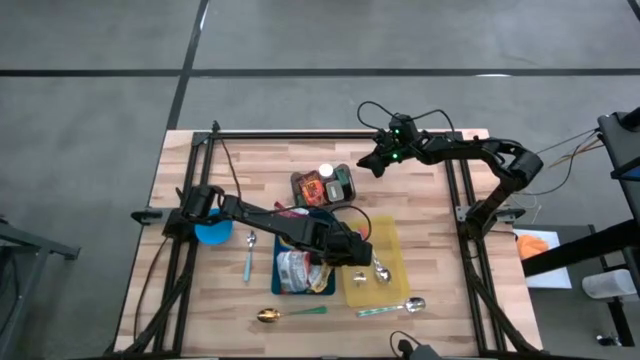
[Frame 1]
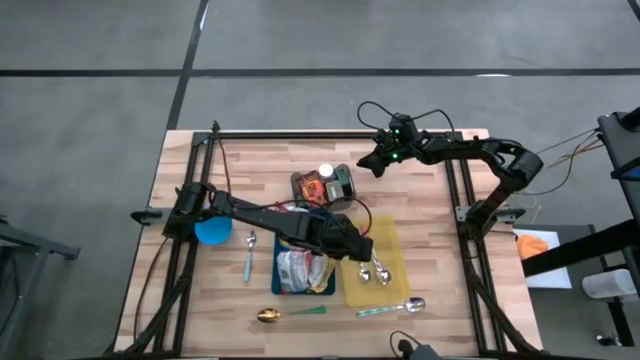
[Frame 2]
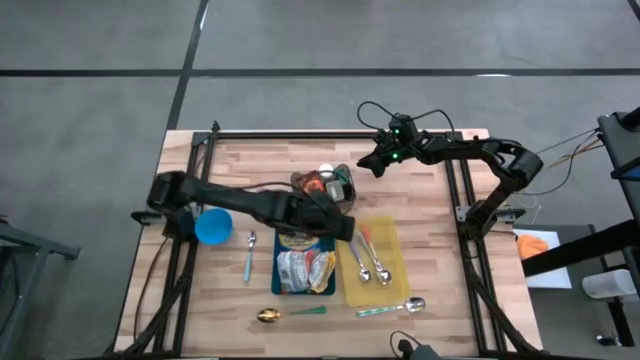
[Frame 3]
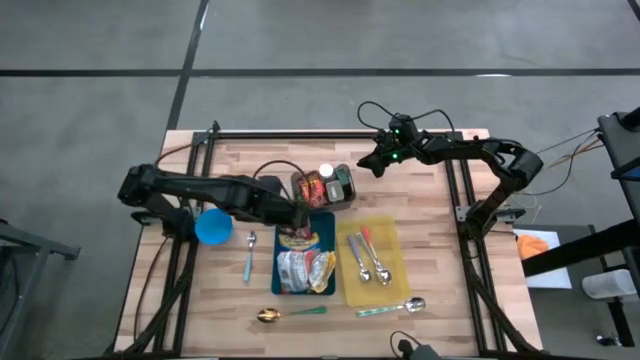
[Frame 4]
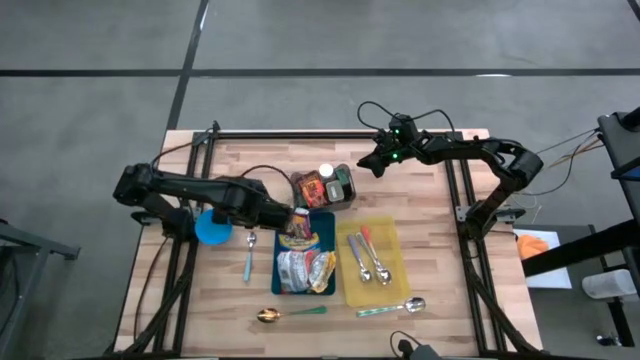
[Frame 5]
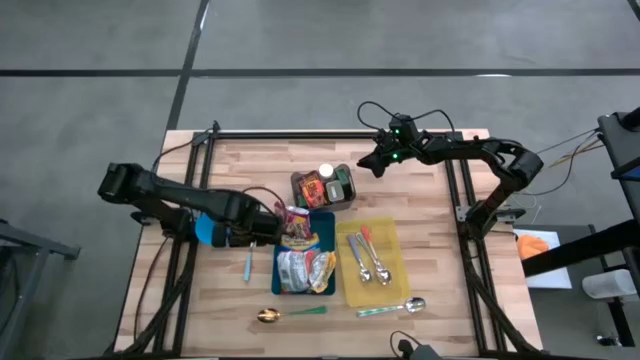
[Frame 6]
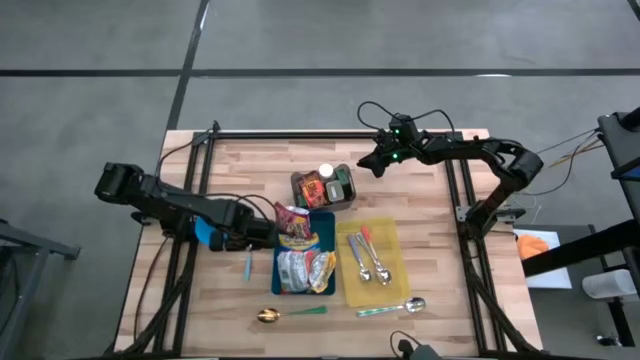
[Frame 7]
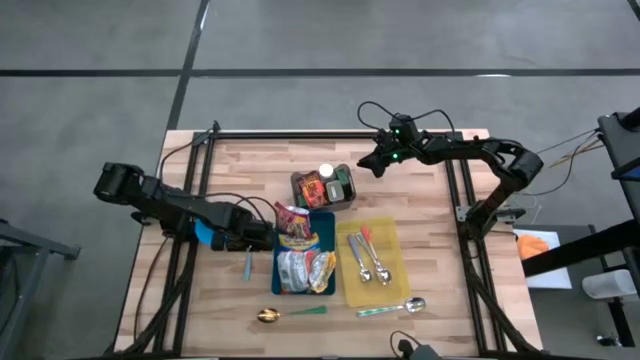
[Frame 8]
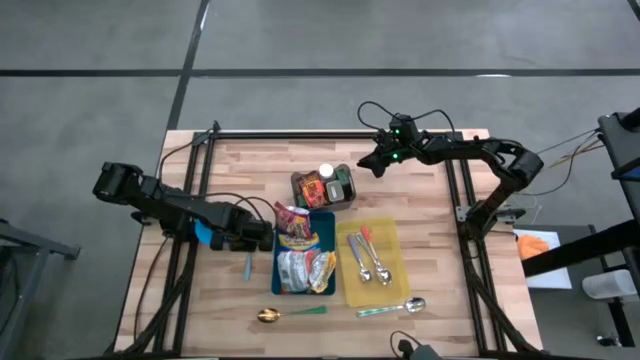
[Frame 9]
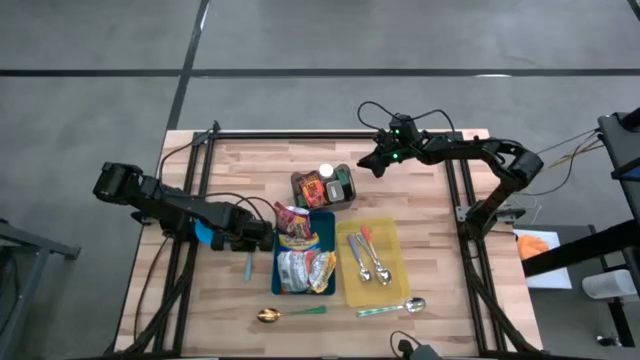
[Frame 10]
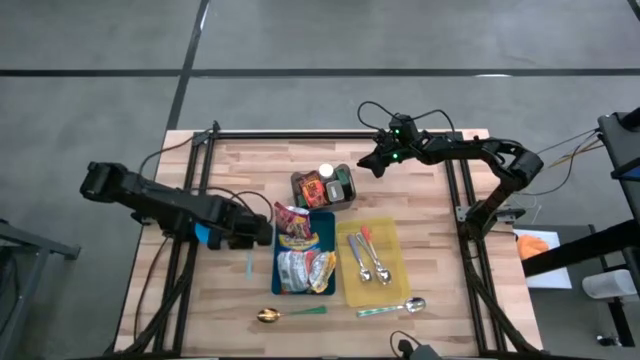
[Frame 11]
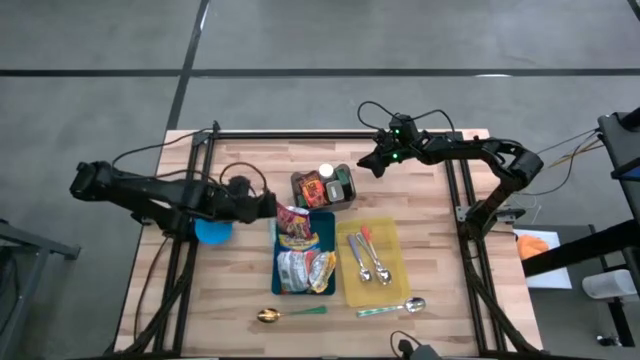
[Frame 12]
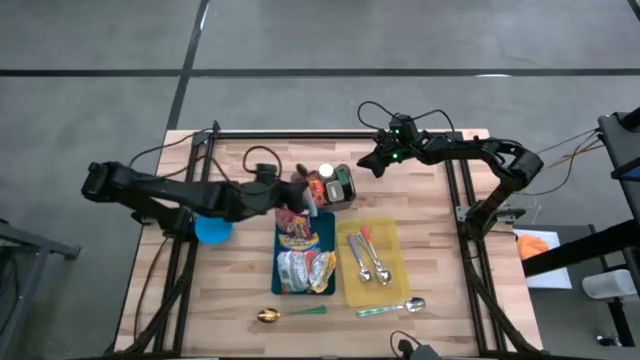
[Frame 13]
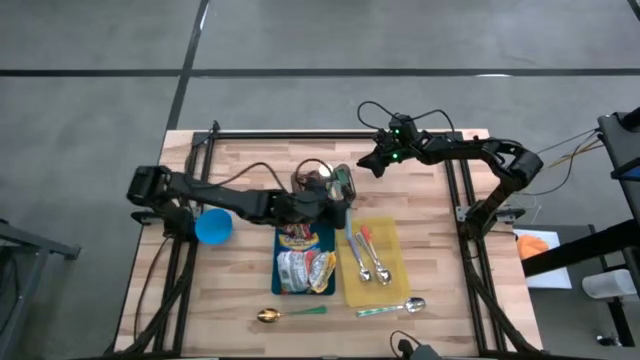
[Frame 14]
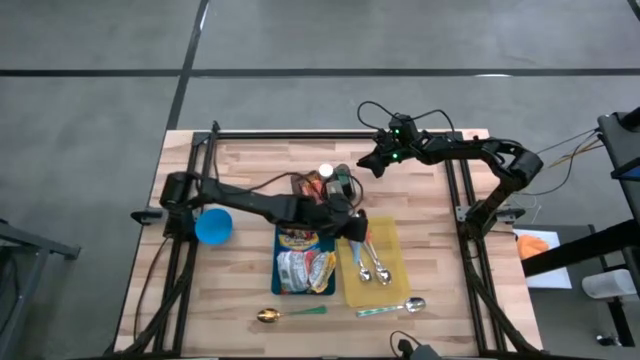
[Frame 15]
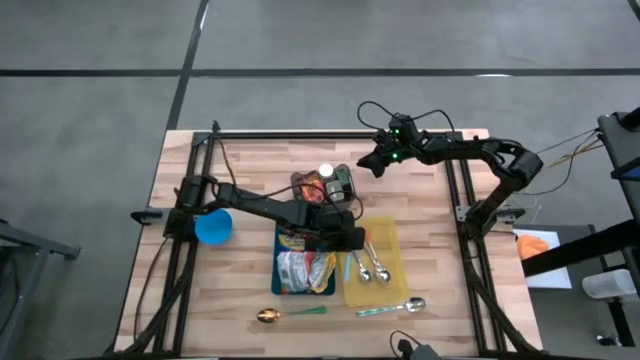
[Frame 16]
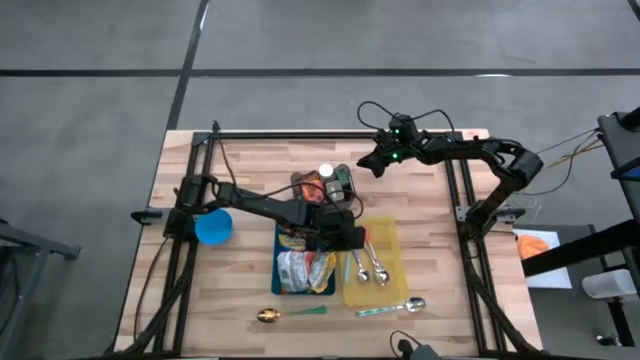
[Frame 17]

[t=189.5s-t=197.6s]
Put the blue spoon into the yellow bin

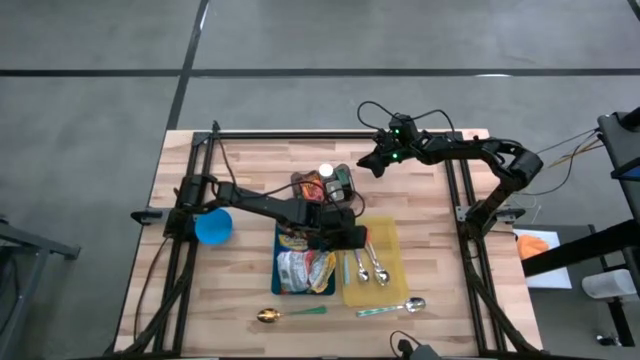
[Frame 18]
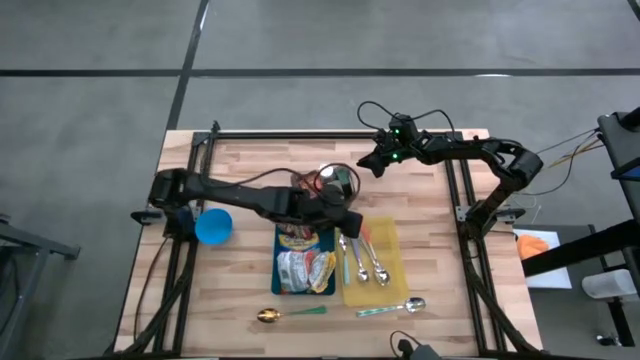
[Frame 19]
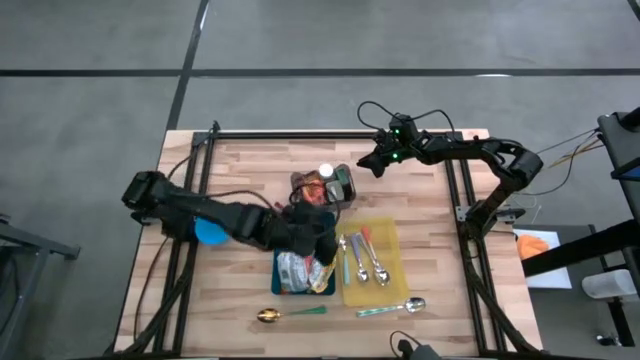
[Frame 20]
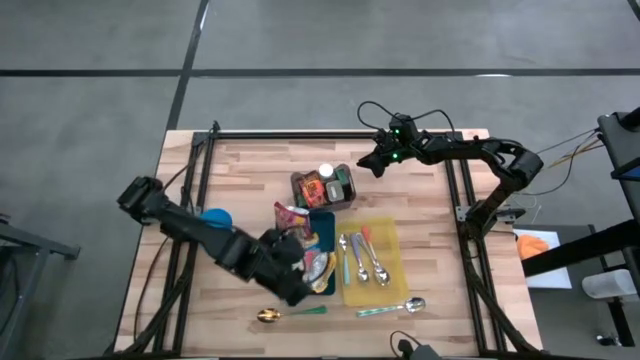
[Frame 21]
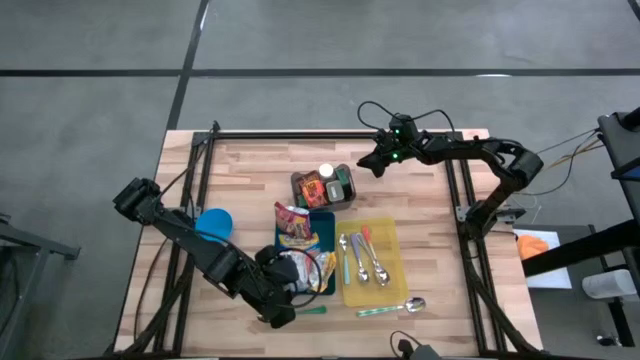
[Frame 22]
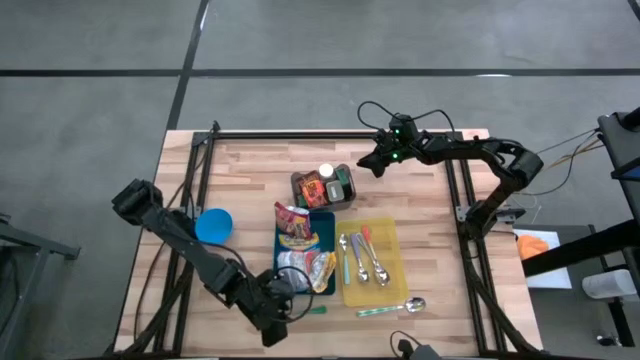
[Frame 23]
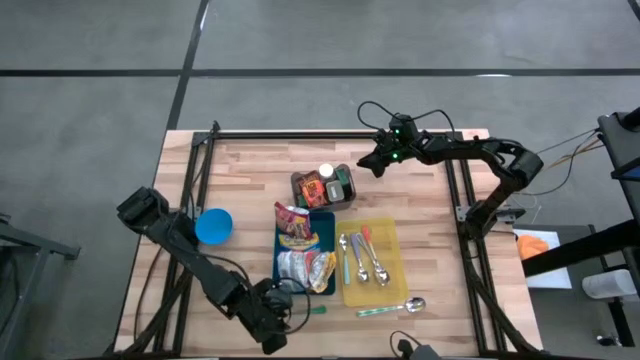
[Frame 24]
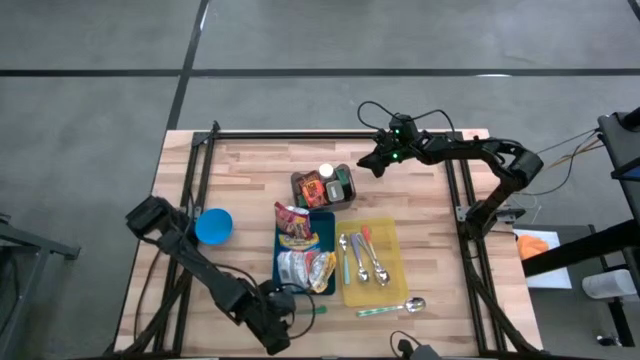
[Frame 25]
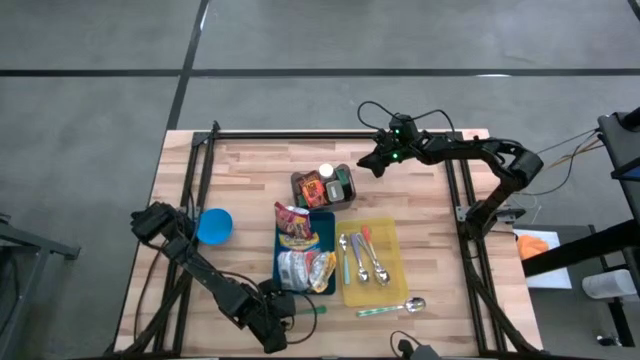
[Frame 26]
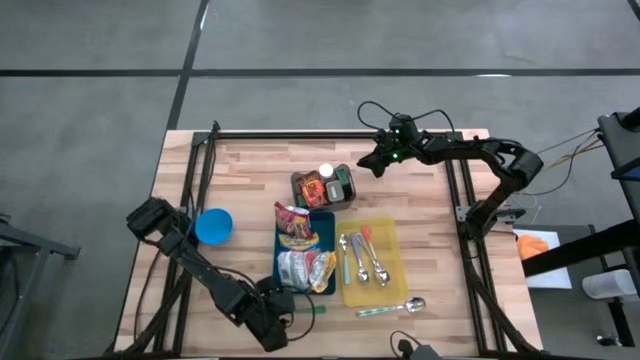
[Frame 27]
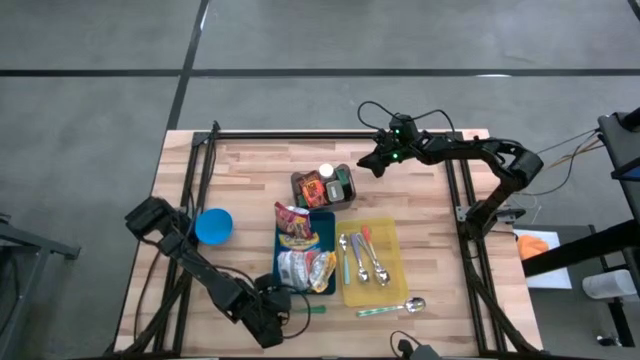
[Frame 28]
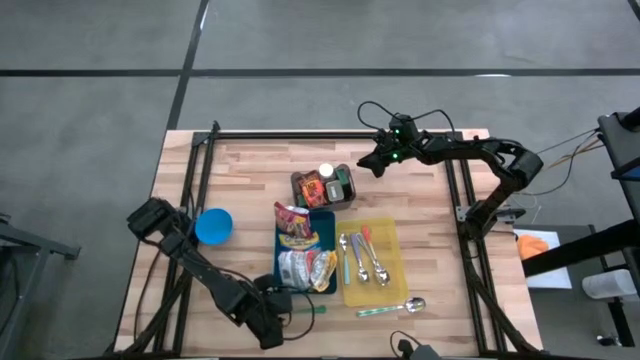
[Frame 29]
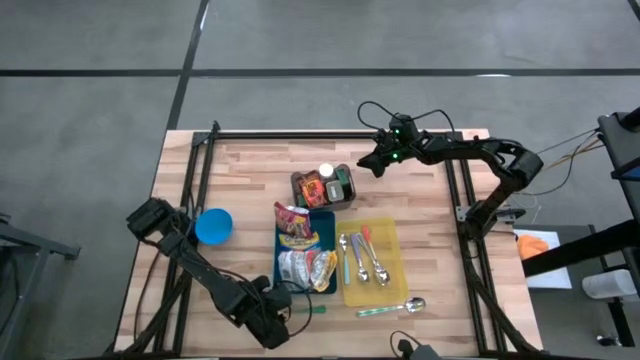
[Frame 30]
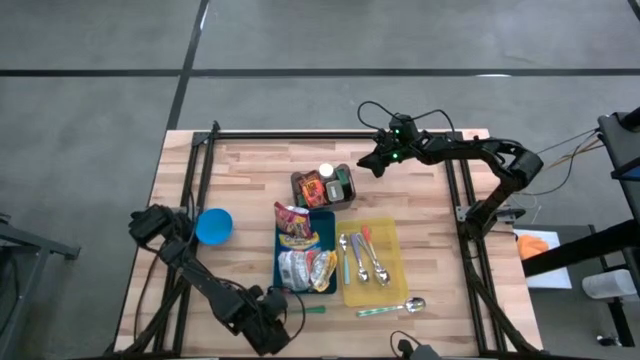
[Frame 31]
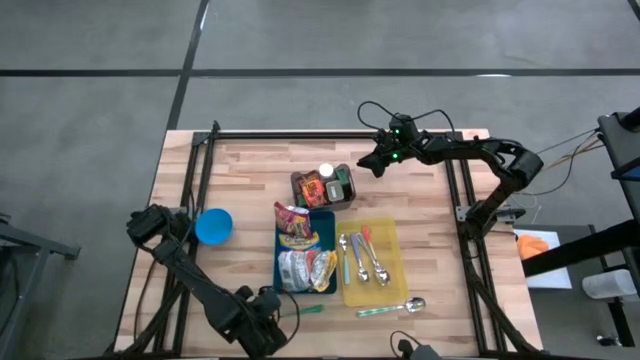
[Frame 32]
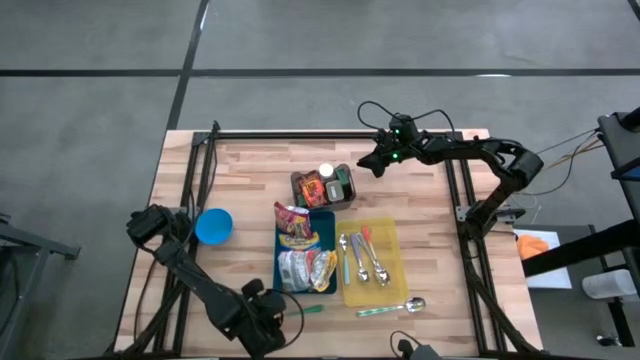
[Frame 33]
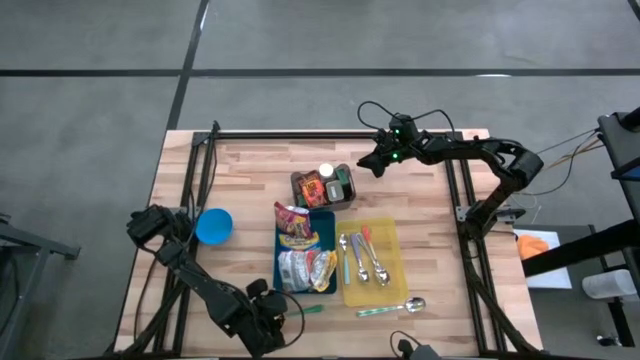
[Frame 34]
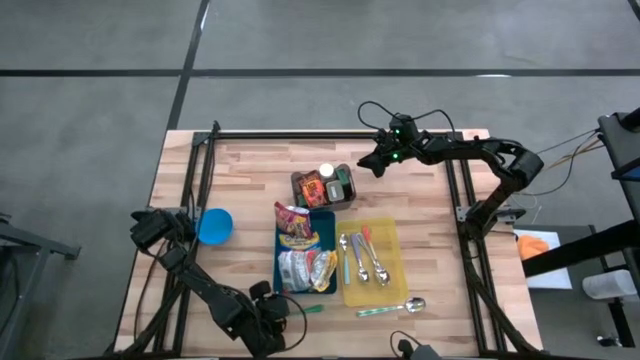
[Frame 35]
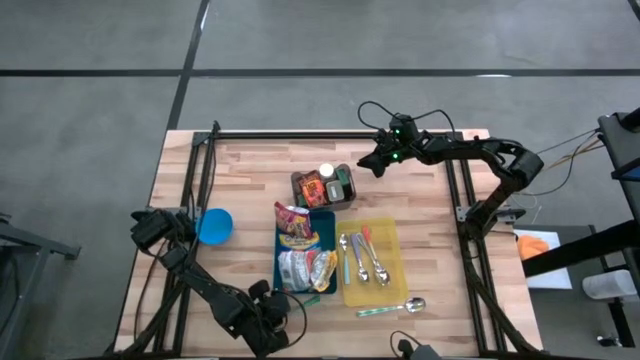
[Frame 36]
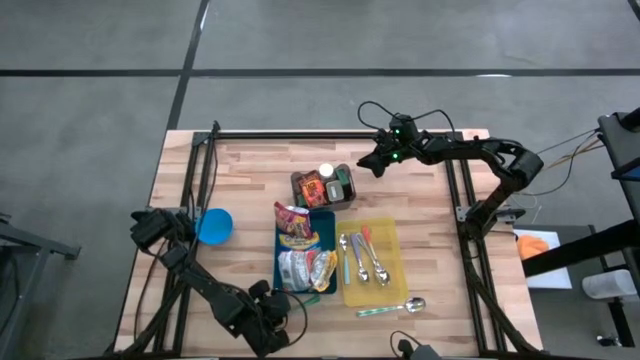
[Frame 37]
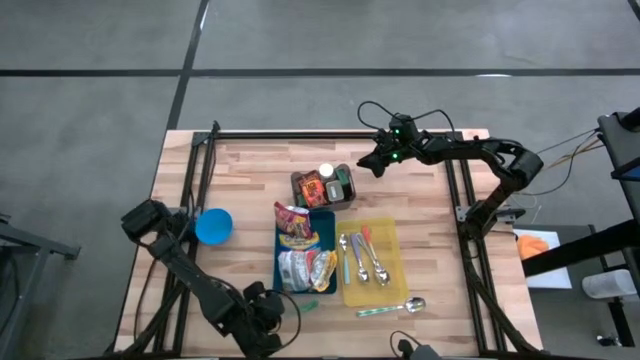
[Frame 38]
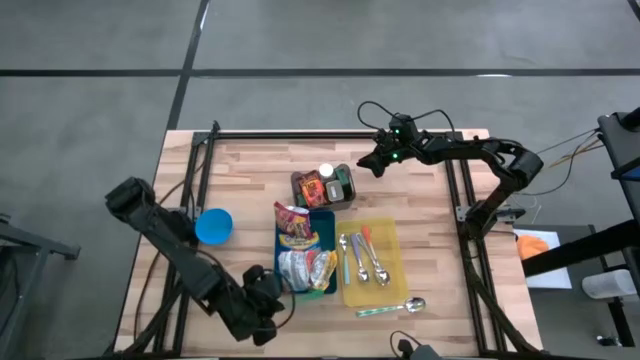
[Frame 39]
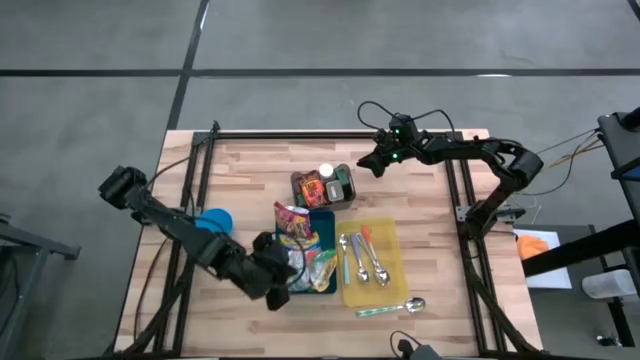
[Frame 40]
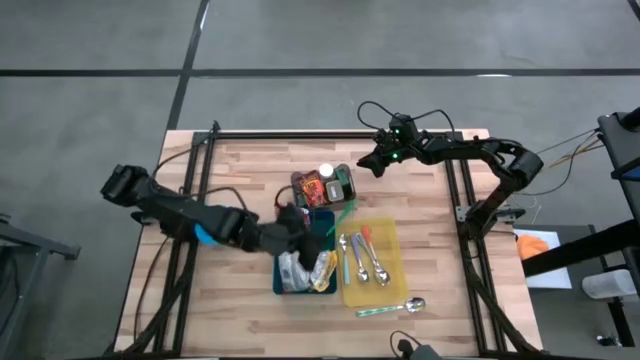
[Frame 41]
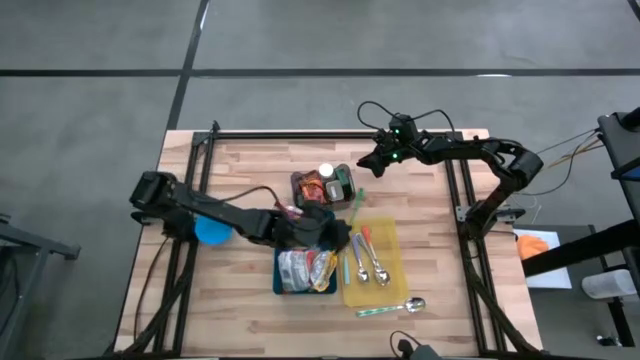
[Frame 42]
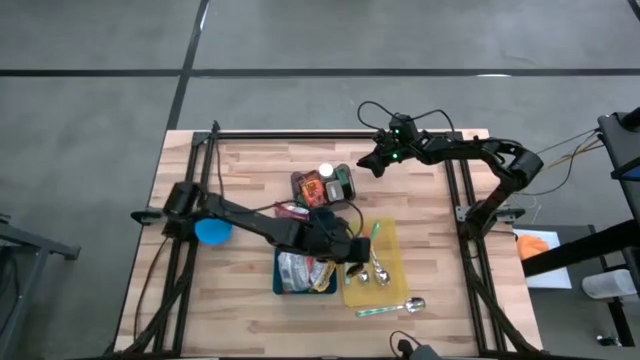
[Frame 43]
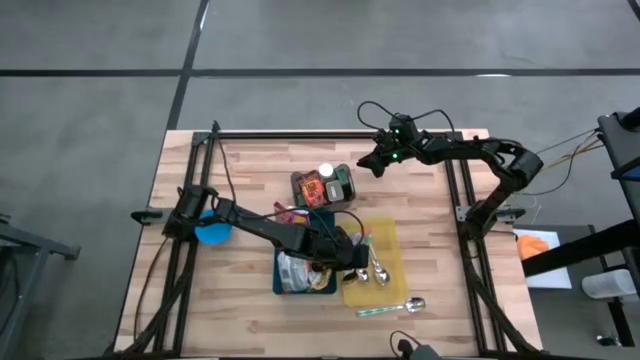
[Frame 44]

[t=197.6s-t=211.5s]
Put the green spoon into the yellow bin
